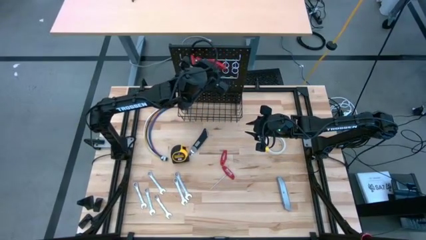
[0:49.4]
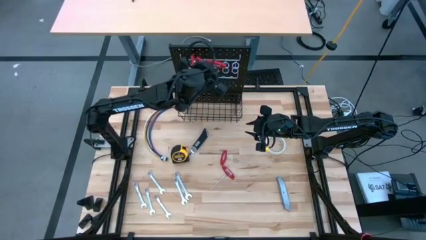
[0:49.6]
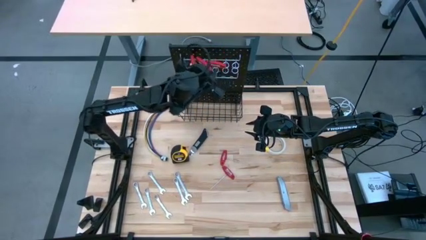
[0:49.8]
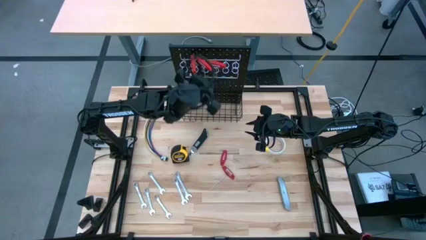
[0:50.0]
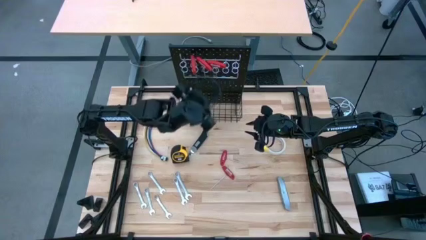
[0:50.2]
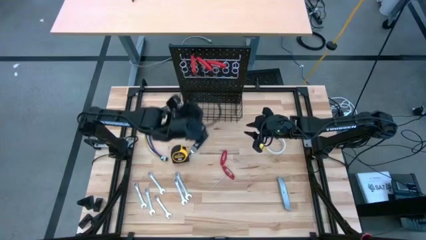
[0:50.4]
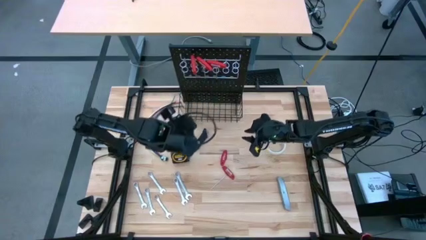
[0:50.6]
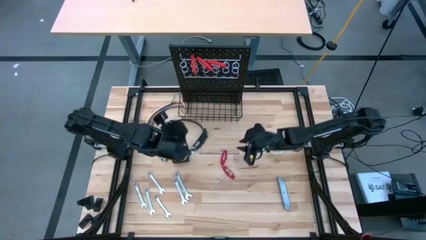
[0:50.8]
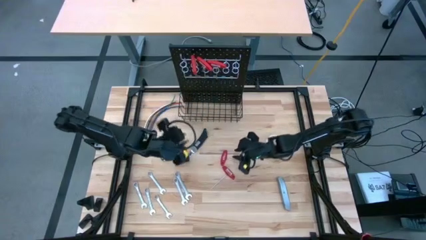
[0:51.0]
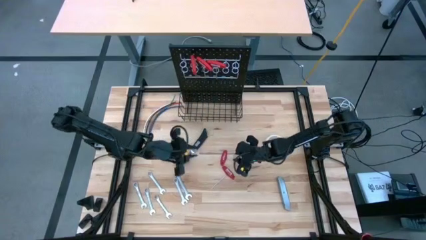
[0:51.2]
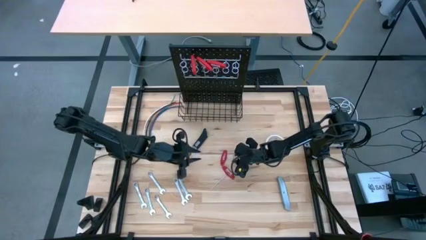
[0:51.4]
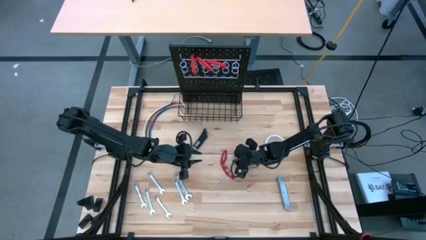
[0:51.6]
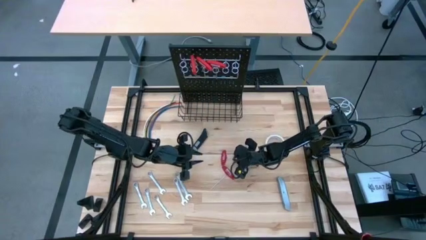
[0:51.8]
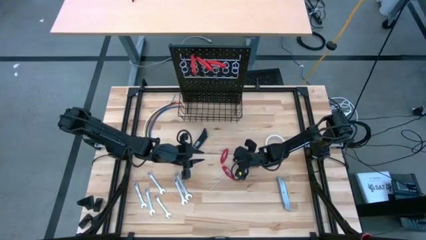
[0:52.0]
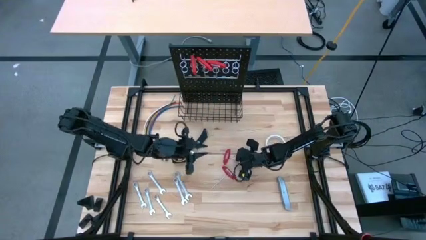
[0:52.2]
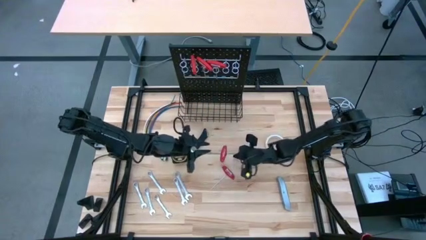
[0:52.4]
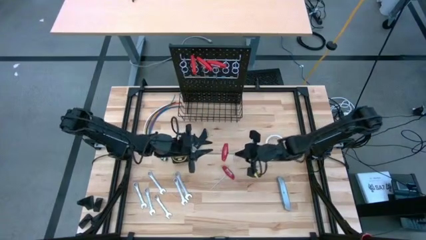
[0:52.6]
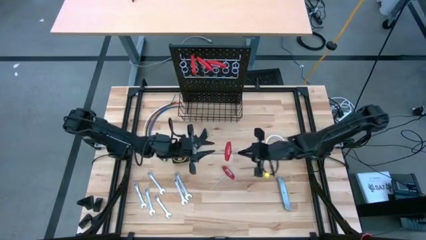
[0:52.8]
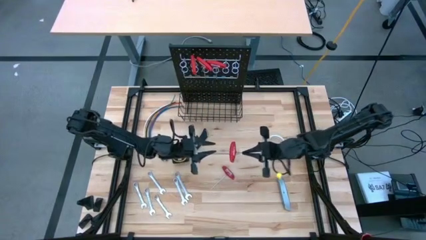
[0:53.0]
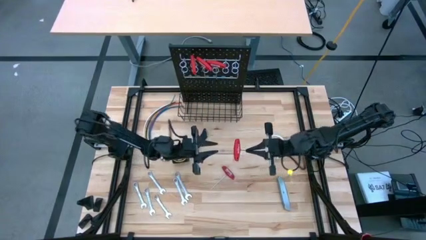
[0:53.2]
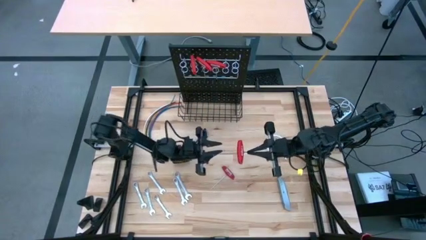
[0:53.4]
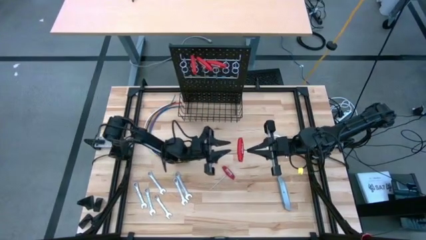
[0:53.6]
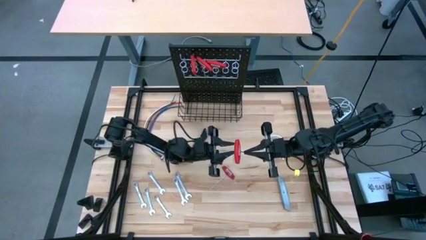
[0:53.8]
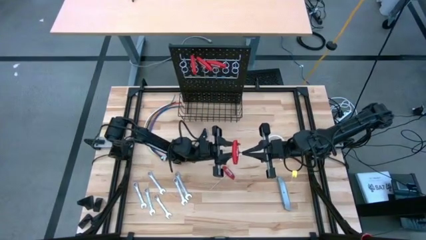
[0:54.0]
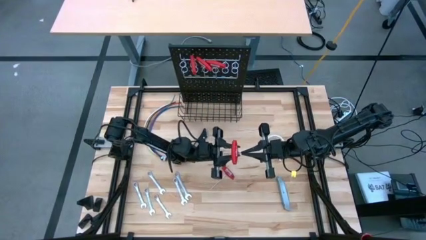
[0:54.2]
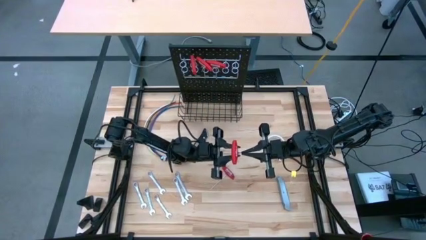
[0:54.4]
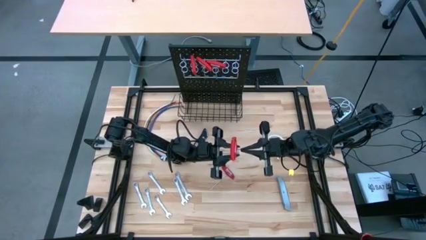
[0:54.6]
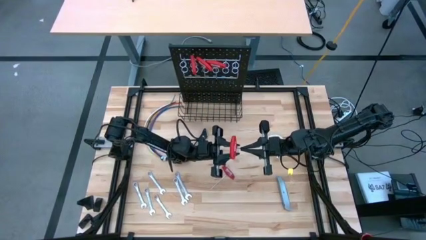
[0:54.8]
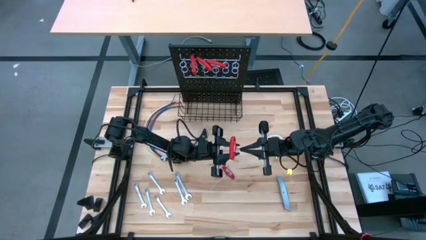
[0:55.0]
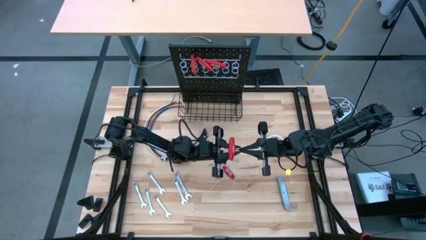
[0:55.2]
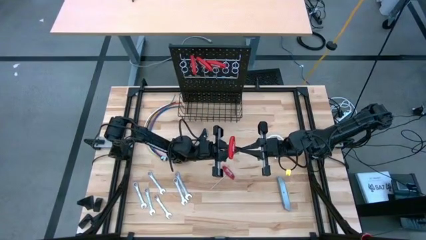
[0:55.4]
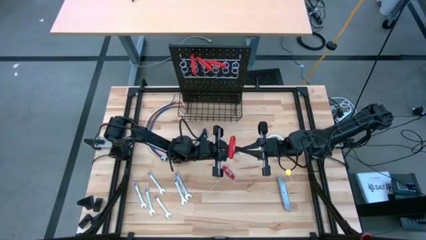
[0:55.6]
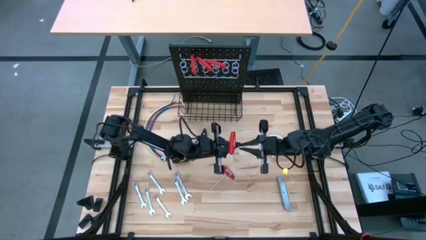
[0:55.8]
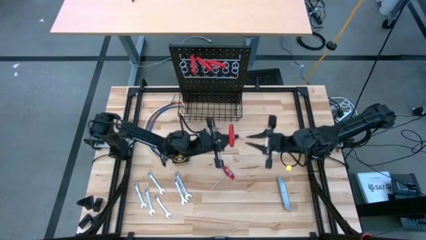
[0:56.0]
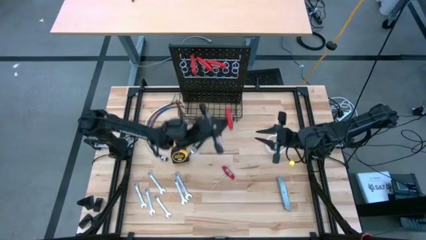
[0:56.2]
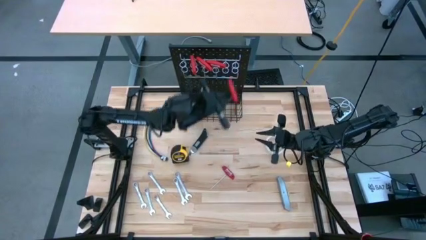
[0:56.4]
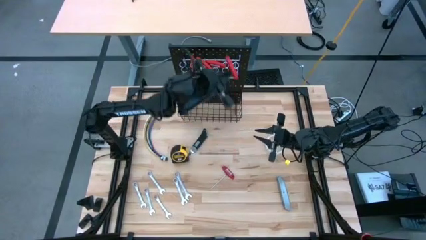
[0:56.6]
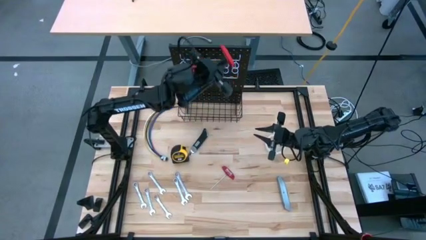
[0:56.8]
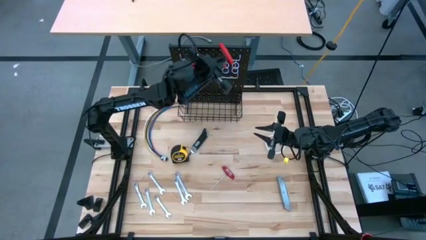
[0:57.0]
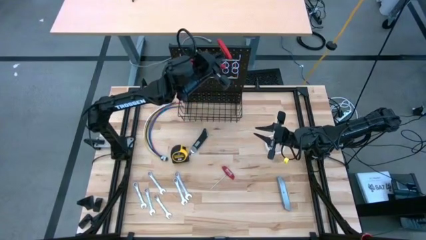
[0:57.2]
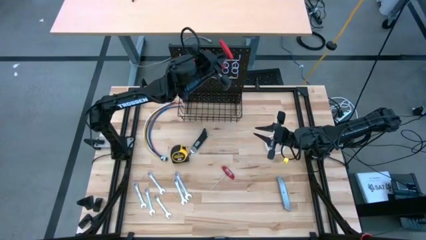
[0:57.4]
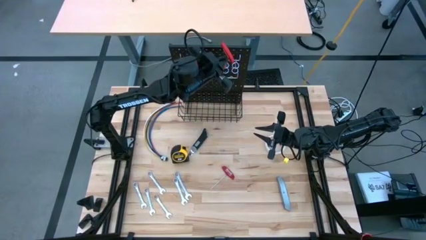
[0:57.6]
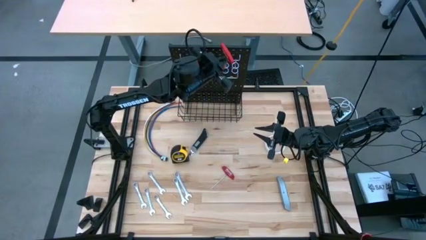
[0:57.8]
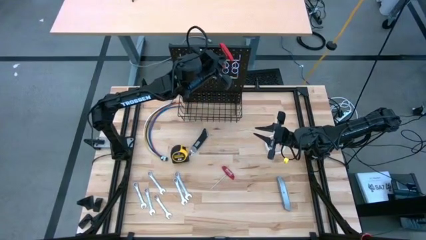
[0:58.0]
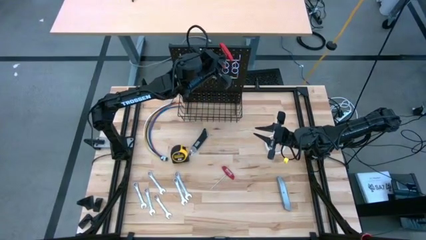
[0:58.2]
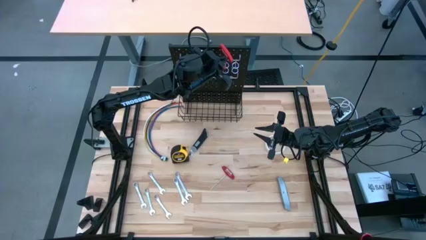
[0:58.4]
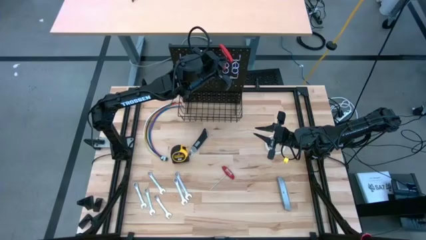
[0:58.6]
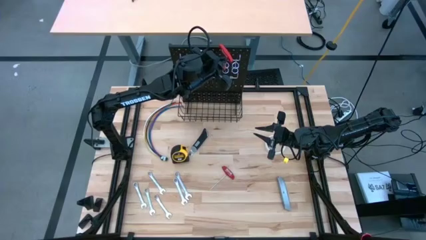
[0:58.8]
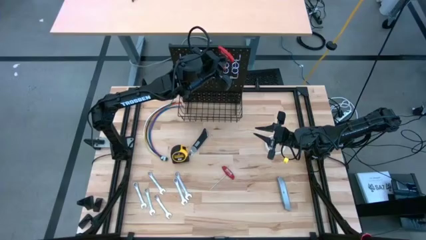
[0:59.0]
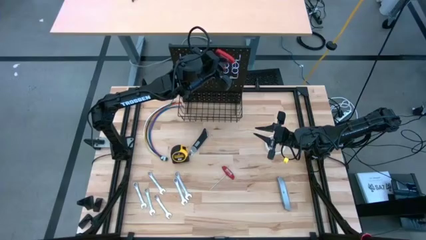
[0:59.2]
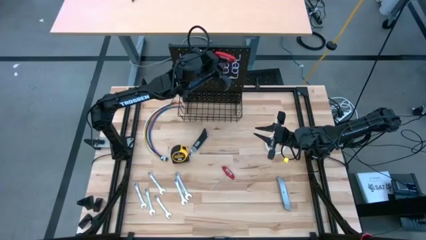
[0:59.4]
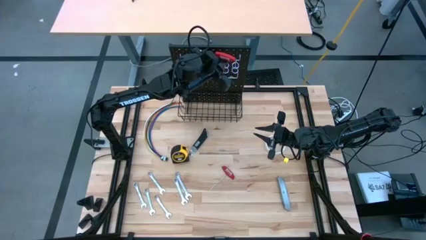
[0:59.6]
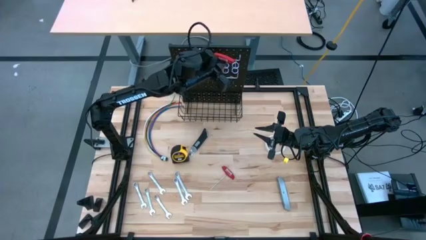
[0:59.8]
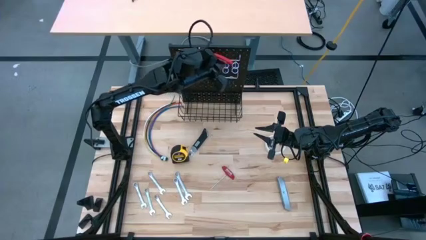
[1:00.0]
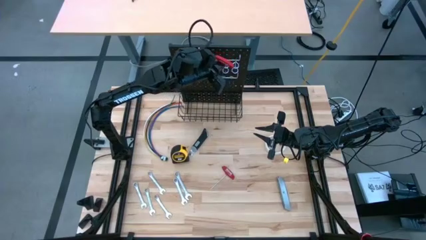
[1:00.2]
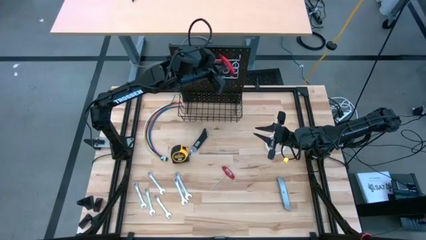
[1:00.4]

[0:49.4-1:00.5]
Task: Hang tools onto peg board
Hang the top allen wrench on the peg board

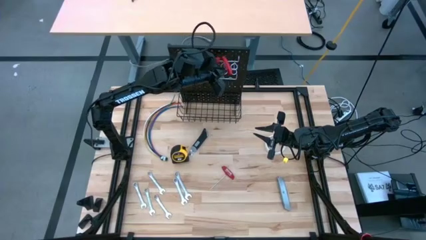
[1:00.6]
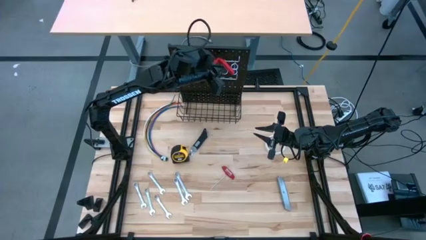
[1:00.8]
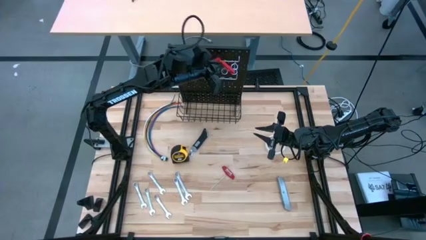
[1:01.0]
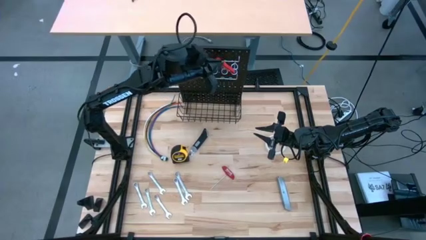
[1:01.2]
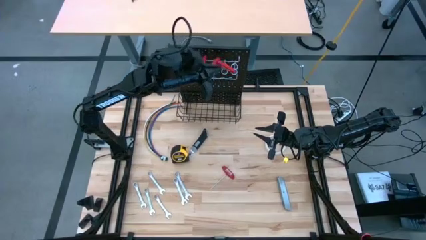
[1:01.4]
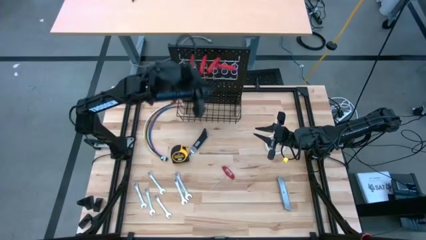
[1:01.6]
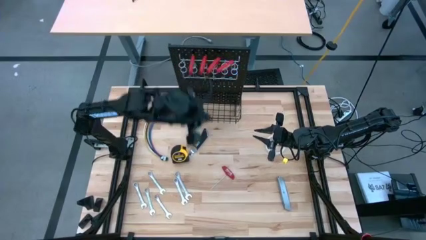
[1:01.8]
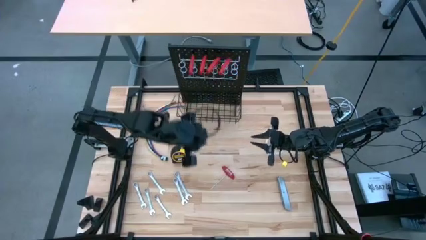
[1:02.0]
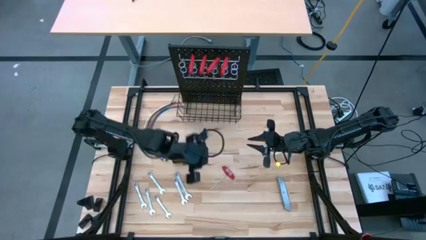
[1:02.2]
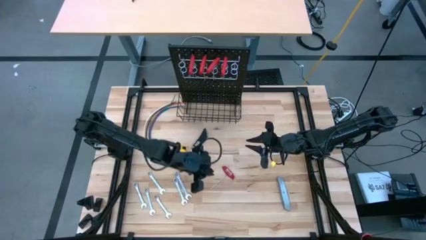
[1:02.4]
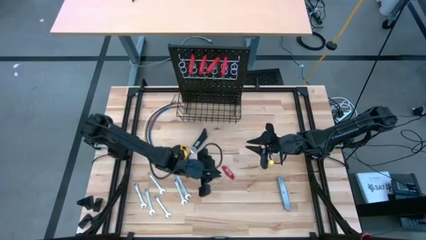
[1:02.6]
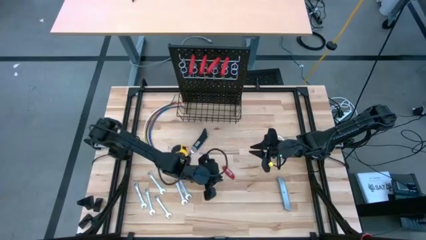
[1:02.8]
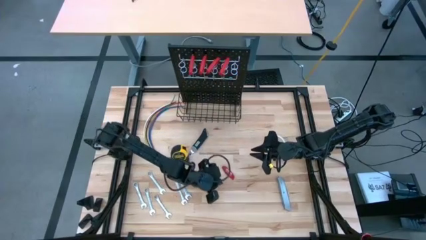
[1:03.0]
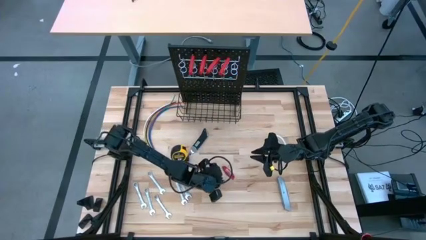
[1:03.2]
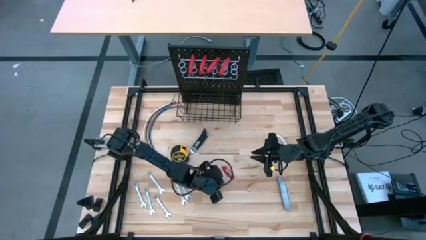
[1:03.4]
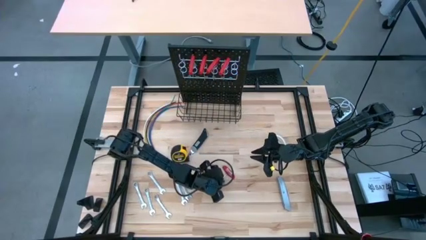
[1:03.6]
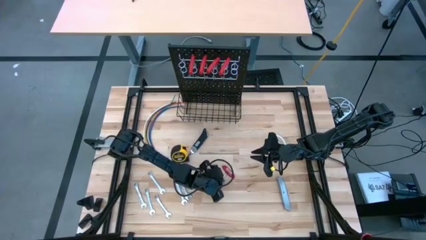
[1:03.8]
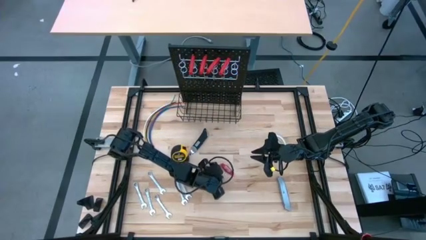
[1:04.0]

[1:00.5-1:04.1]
Hang the allen wrench on the peg board

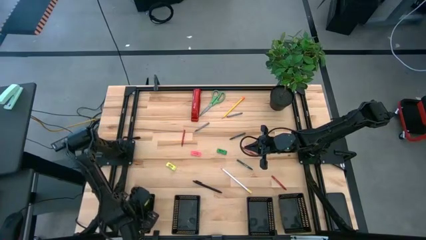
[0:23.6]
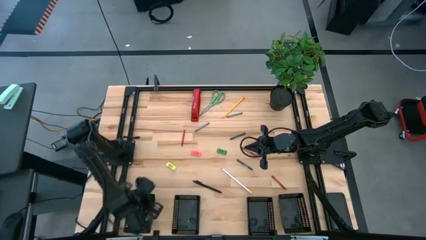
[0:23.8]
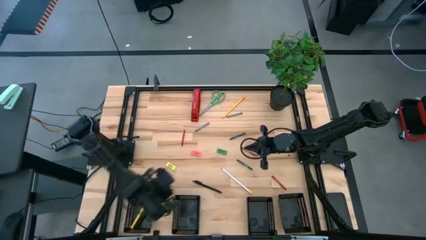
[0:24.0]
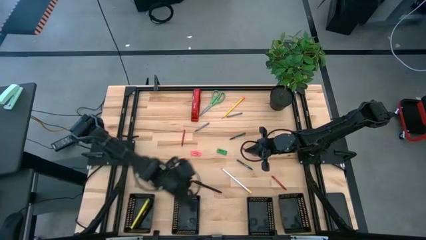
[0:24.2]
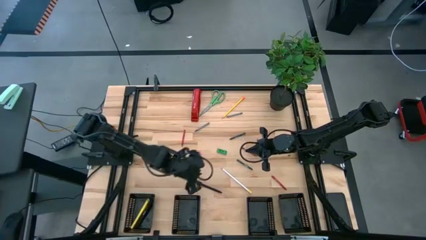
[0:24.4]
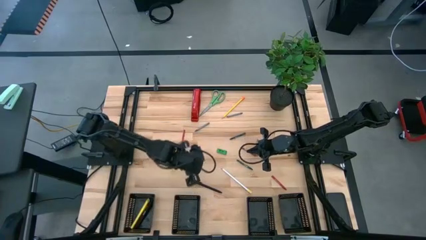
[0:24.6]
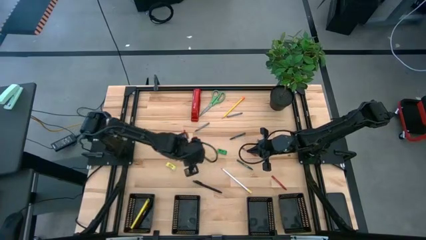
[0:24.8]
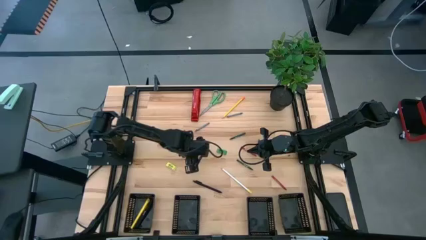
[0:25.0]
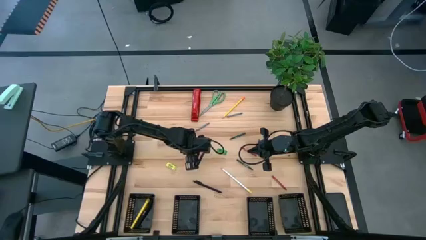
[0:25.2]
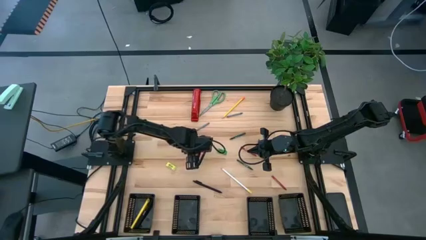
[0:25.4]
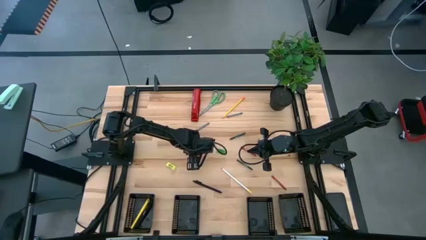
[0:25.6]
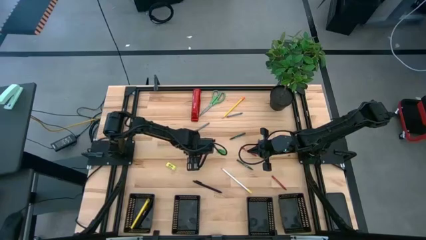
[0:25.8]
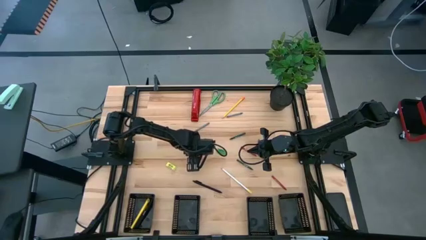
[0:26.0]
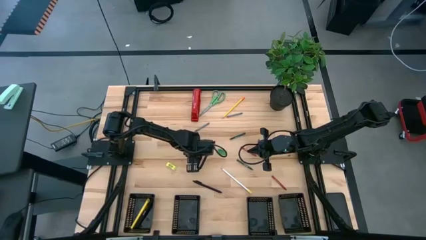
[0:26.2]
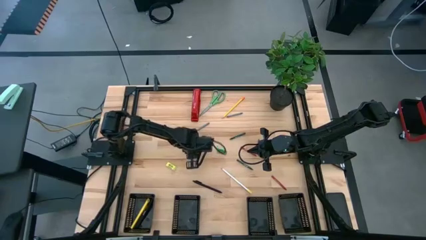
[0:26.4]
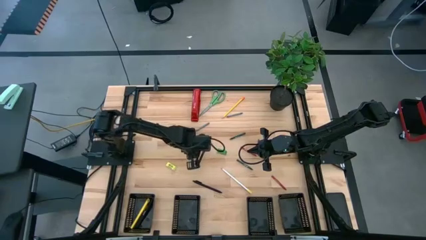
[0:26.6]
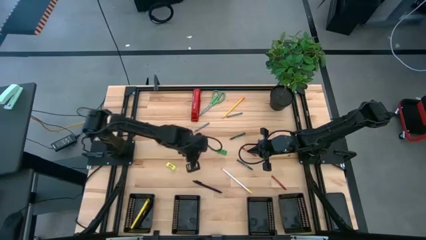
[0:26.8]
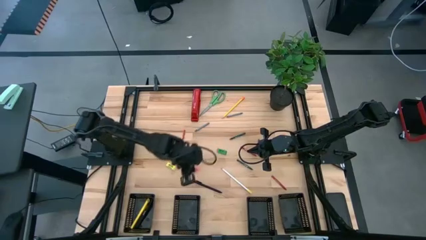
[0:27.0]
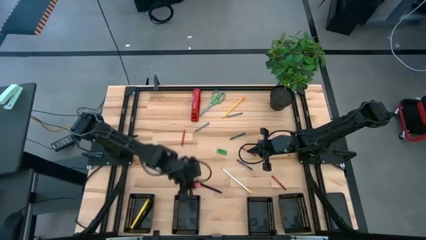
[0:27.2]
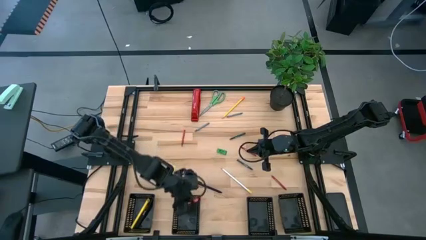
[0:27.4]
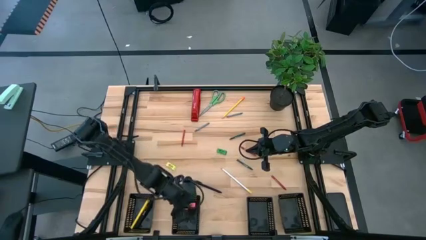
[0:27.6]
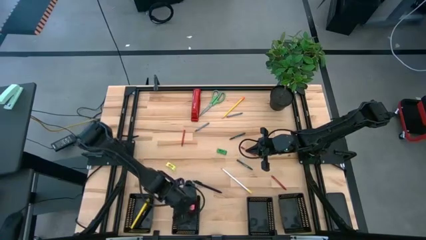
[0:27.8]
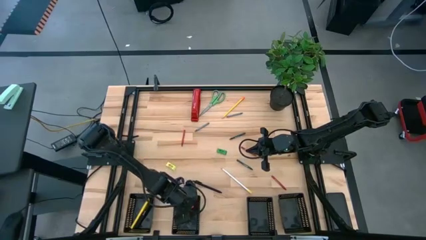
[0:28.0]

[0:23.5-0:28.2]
Task: Sort crayons/erasers/pens/pencils in bins
Put the pink eraser into the middle left black bin
